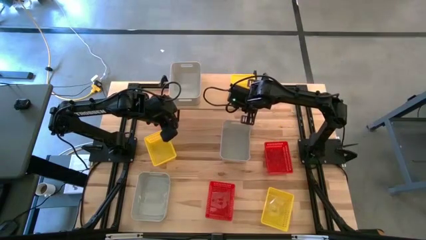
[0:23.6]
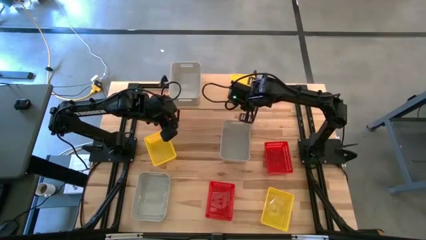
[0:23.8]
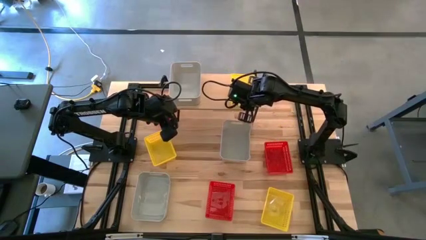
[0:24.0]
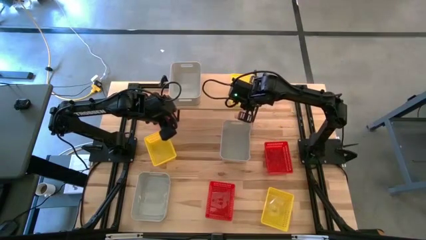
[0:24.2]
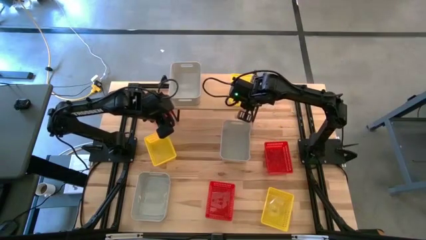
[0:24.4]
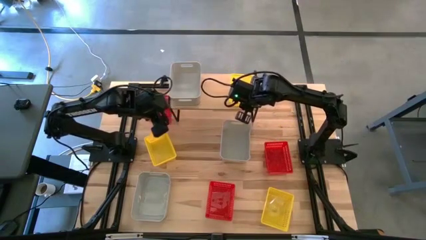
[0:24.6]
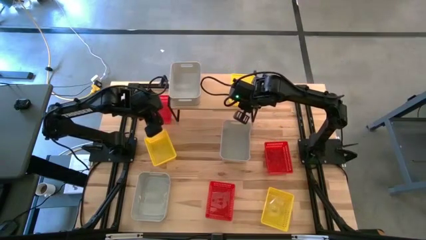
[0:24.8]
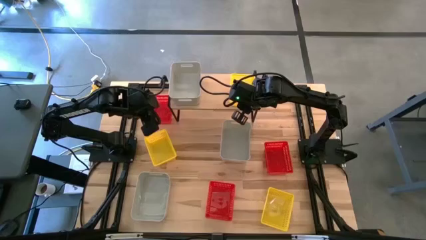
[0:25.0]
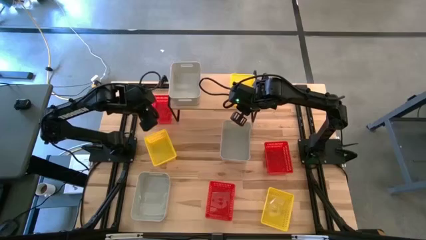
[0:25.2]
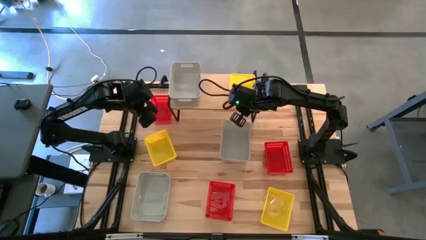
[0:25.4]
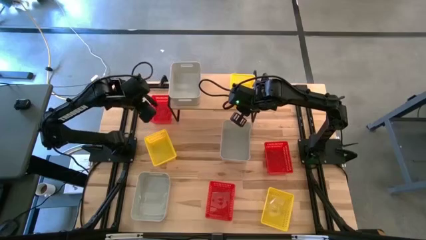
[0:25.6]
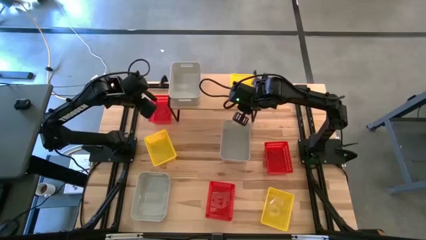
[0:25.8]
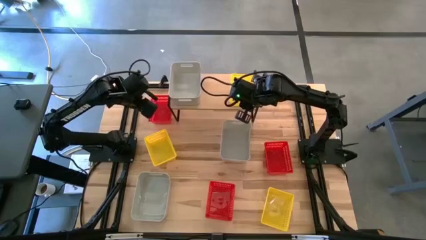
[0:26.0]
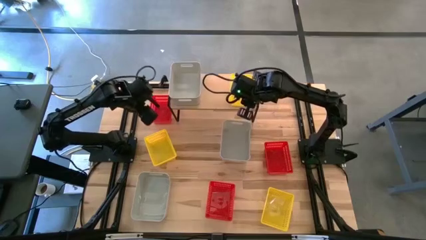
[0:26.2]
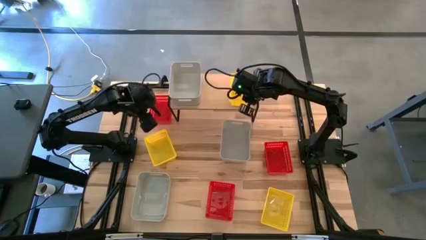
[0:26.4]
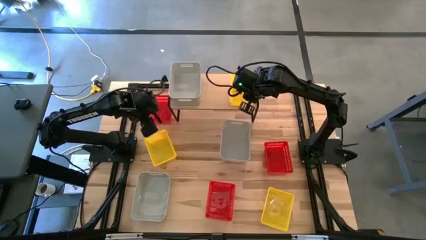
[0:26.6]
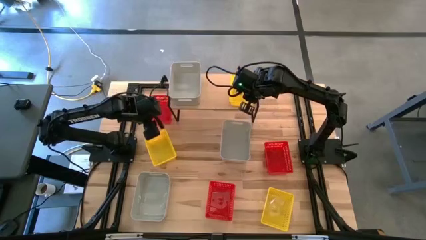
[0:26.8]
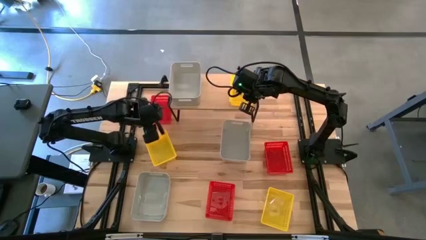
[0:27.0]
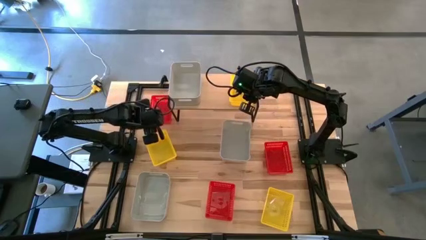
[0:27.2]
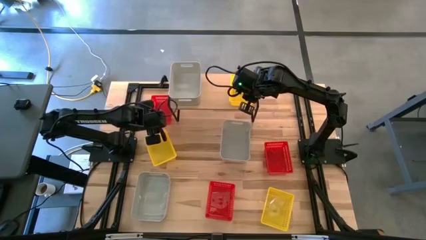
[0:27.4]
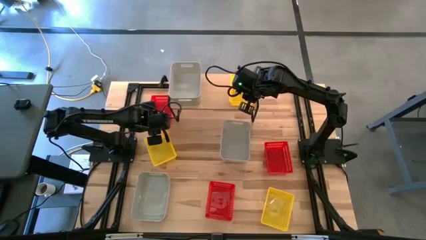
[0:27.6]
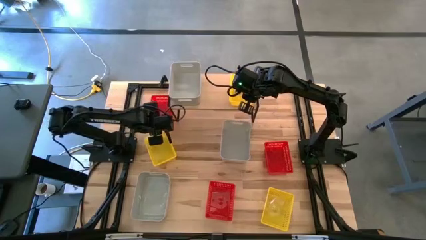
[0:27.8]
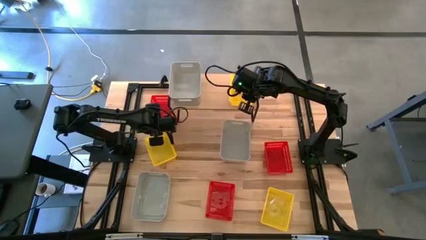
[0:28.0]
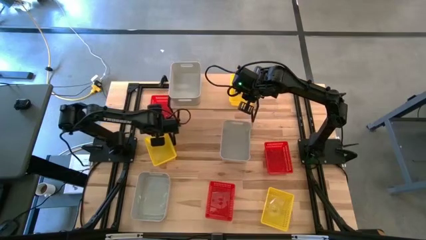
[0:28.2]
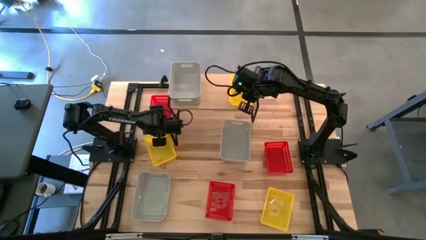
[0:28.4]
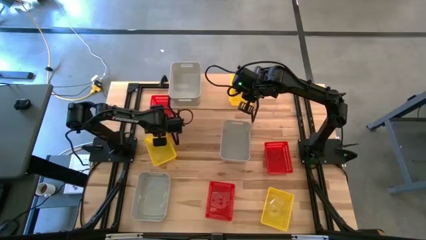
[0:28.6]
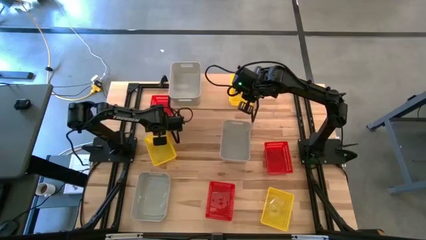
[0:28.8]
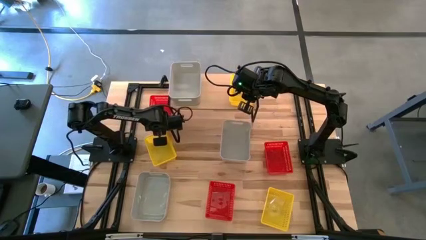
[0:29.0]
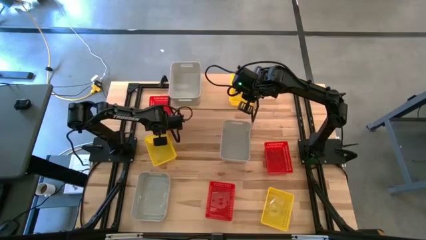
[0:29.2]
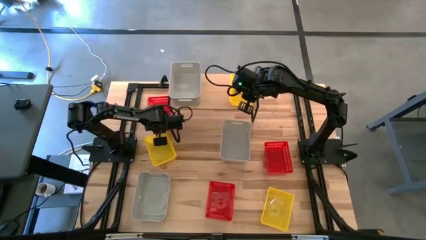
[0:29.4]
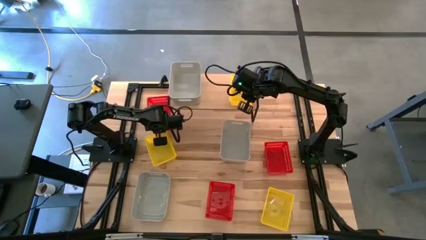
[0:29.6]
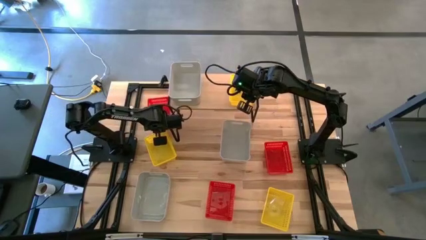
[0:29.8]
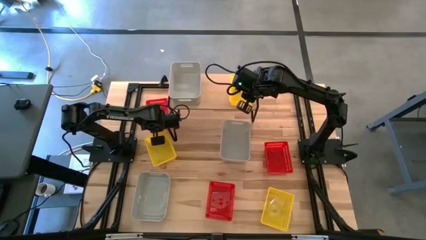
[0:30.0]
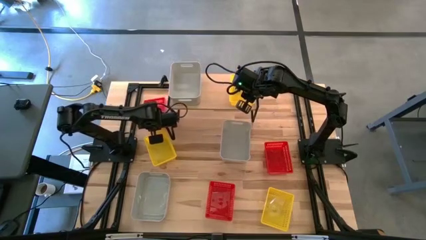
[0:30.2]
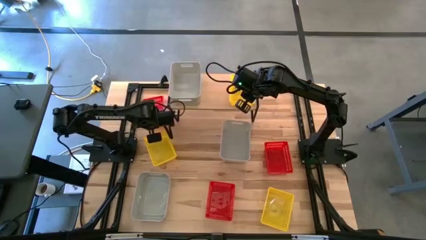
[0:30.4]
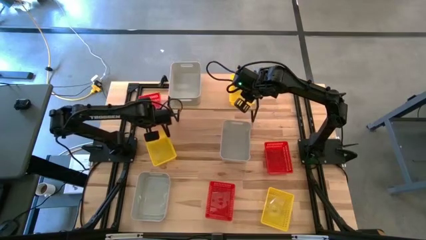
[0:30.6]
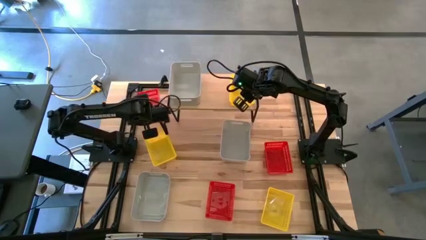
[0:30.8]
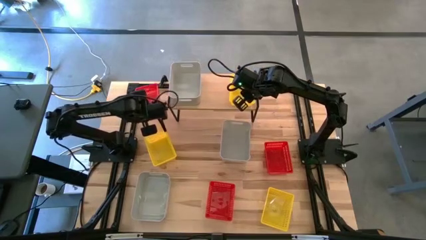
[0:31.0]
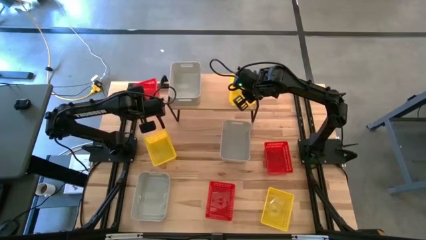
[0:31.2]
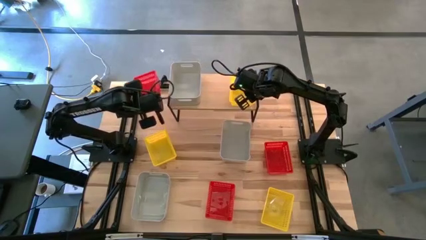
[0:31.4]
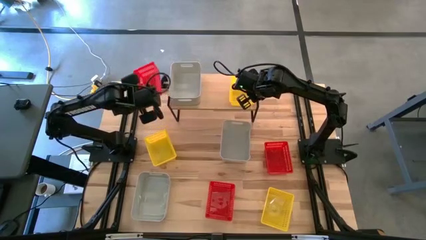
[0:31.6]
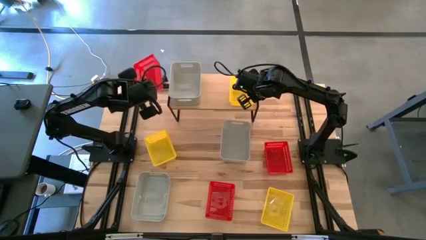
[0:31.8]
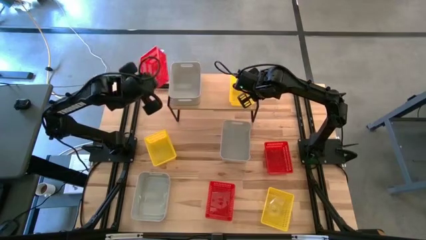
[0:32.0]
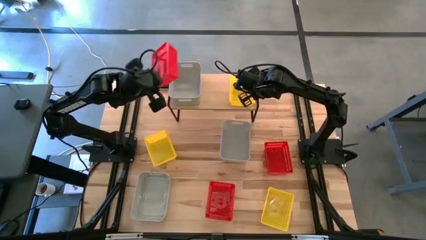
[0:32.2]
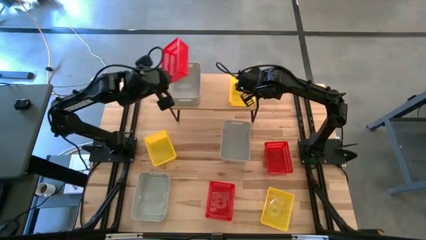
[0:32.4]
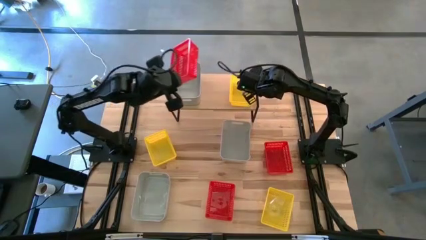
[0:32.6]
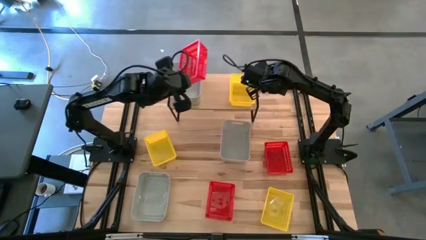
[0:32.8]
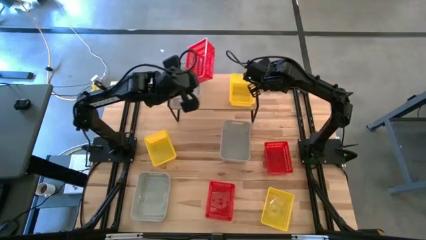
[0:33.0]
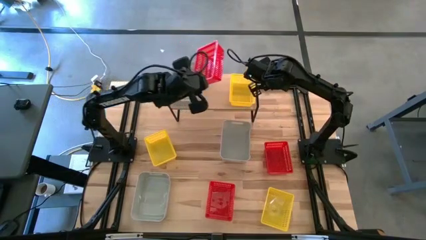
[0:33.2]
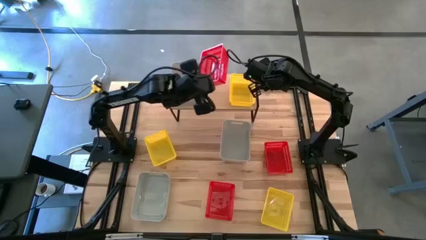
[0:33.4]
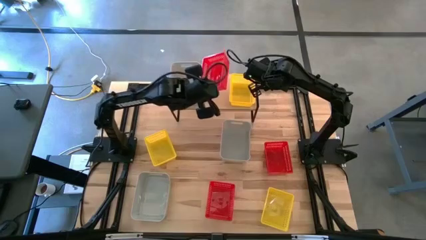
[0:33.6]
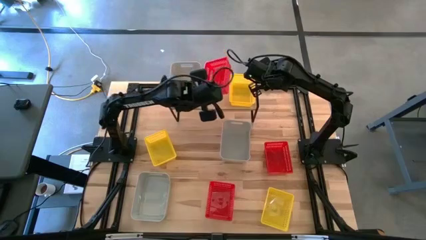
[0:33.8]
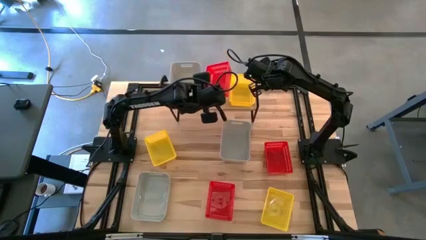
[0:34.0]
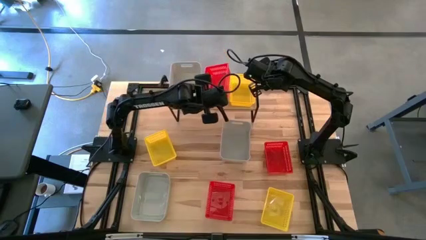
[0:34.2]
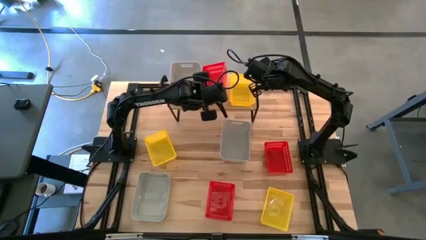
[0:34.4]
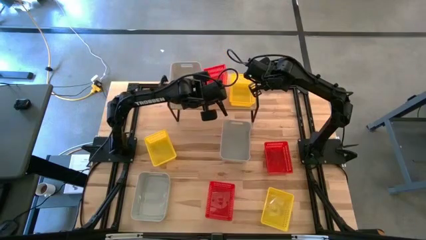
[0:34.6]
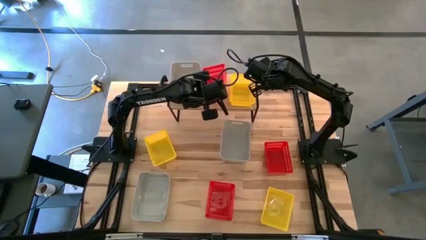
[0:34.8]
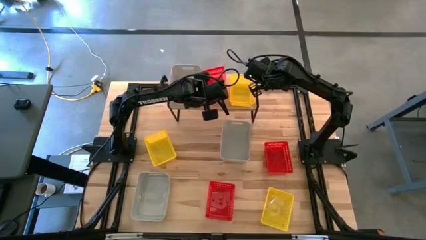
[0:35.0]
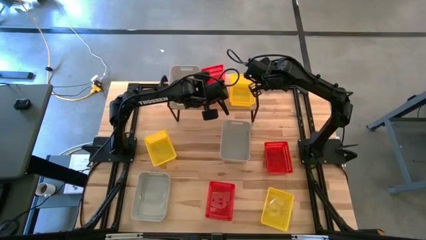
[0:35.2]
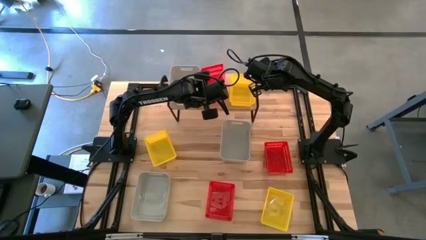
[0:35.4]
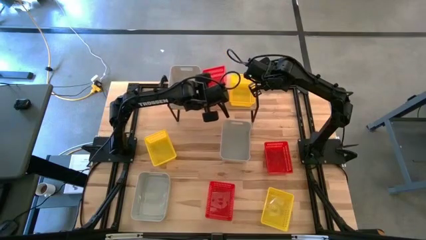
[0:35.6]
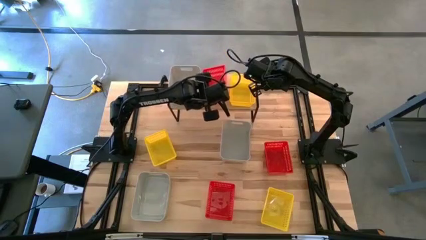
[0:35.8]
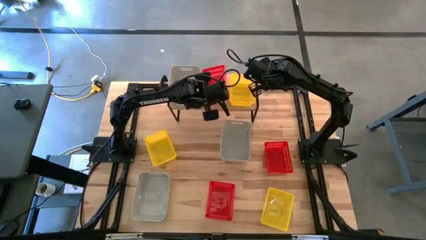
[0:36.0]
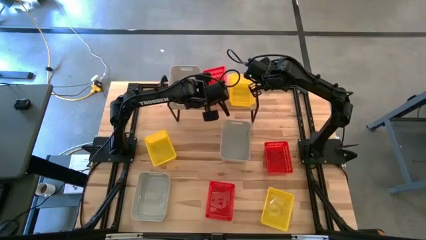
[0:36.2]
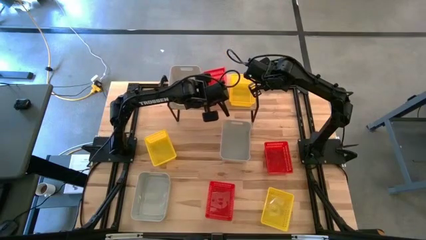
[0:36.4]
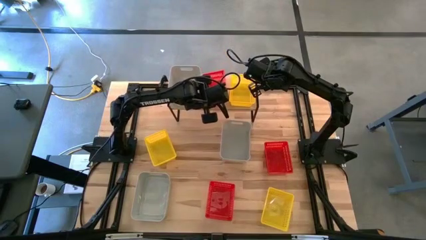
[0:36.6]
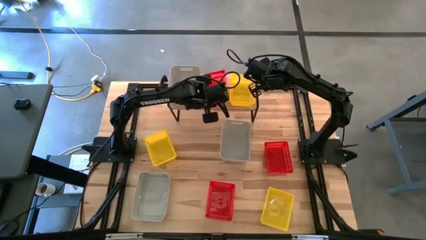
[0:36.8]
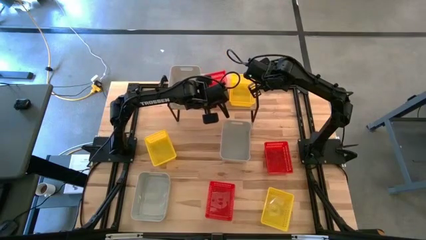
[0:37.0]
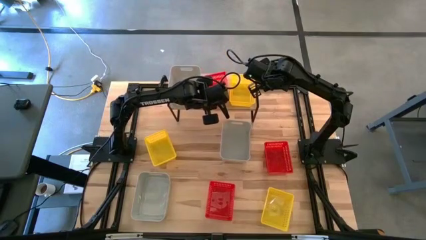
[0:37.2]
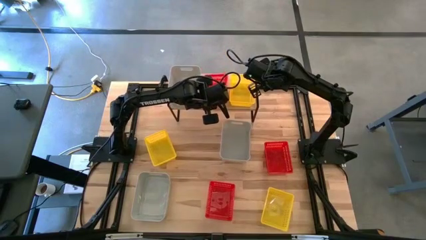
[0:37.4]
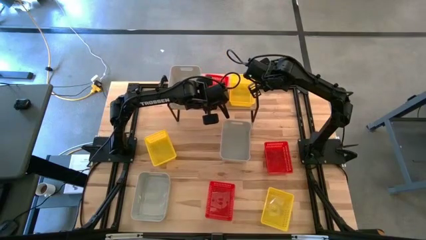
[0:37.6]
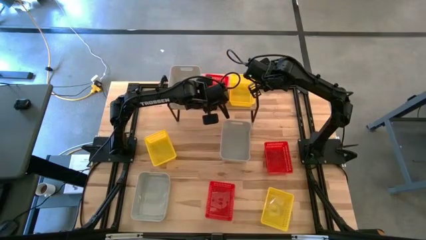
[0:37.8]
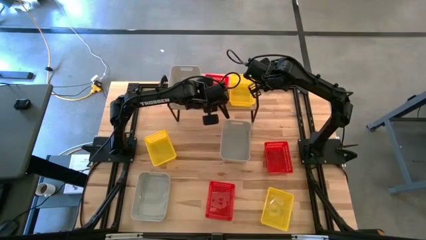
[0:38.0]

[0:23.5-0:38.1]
Task: Stack baskets on shelf by color
Put the top red bin on the shelf

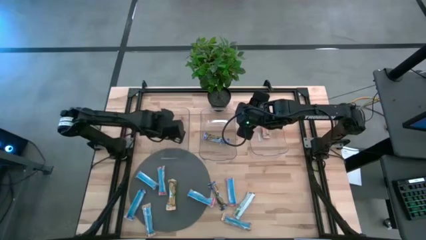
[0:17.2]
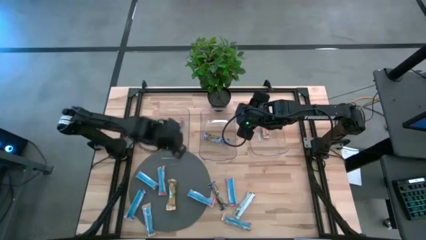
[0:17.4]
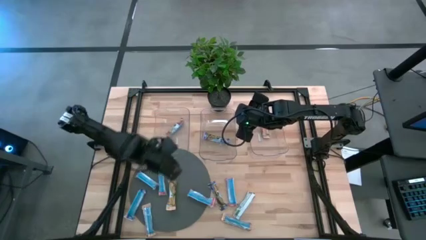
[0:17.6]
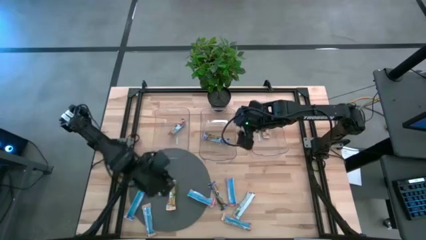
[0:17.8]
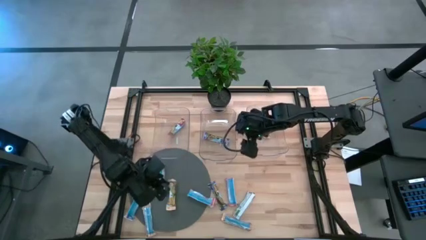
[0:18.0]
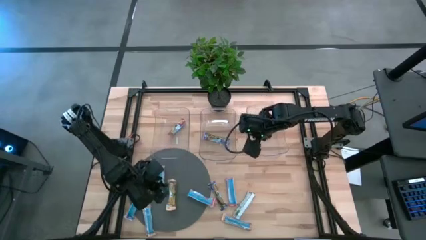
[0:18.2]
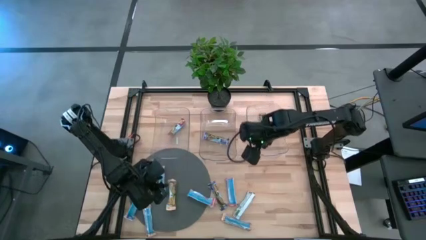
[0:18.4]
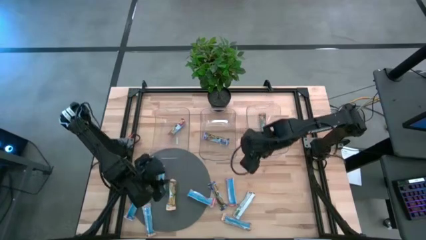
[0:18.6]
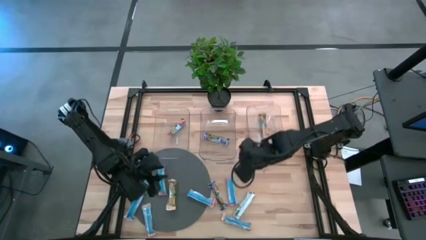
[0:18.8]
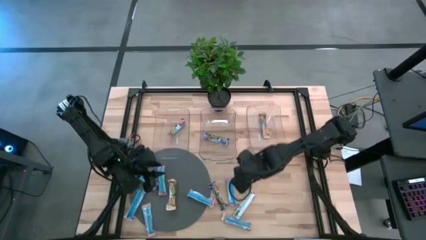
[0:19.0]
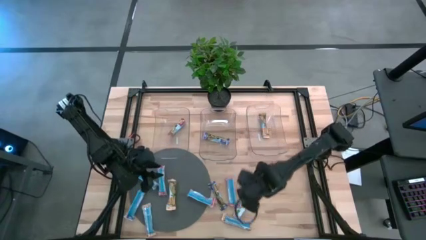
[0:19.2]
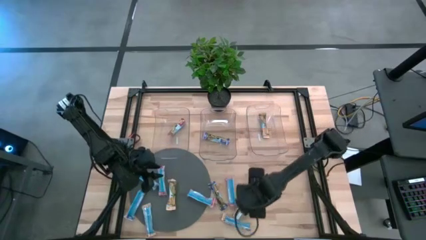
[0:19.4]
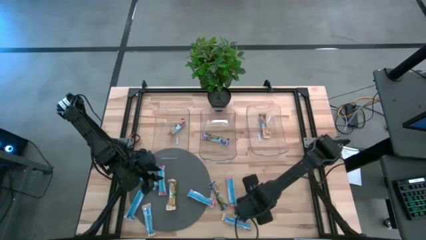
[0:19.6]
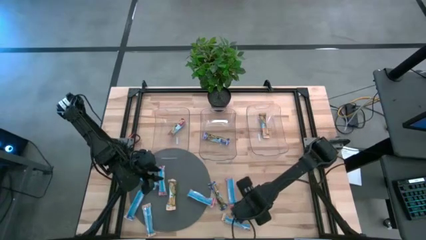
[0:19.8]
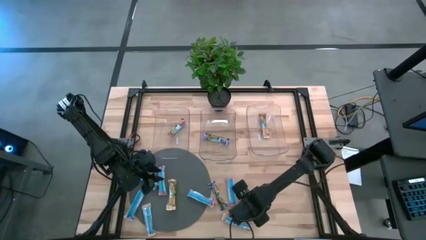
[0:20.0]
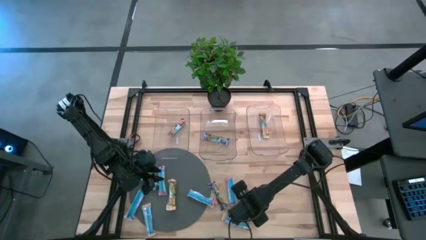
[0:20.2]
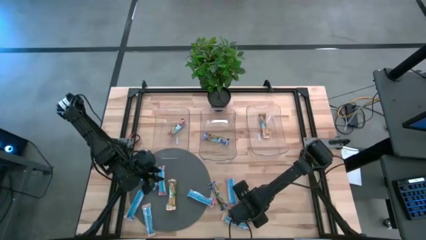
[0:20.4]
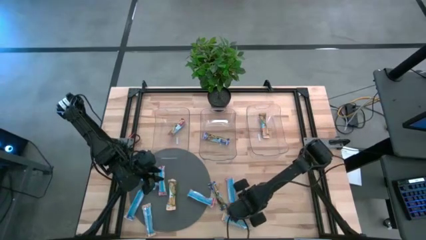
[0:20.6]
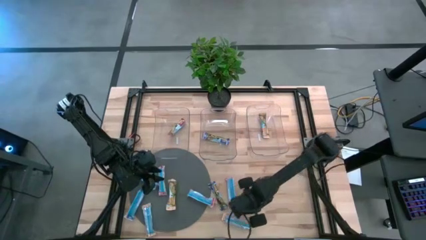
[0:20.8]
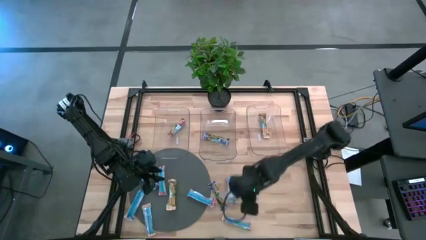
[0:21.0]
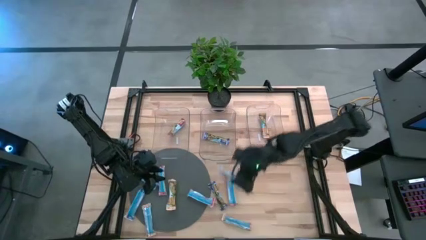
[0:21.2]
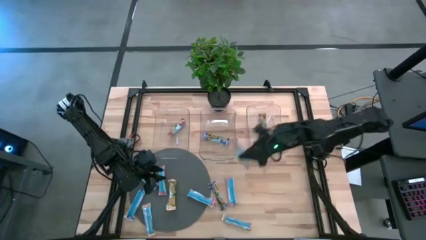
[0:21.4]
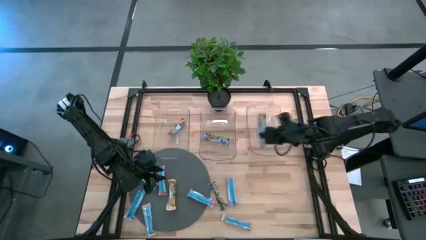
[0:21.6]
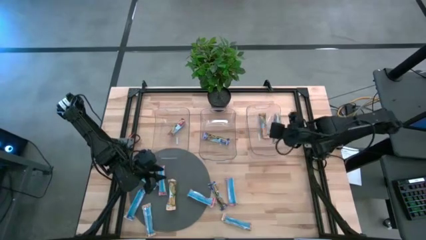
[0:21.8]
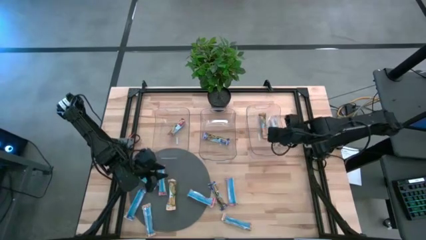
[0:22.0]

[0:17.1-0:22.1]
Task: Pick and place Granola Bars by type
Put the yellow granola bar into the right transparent bin
